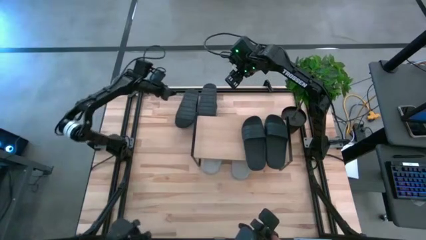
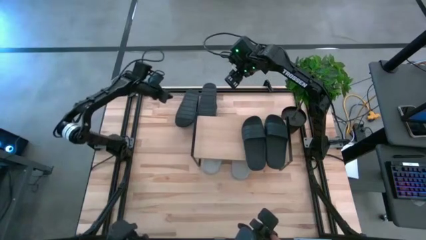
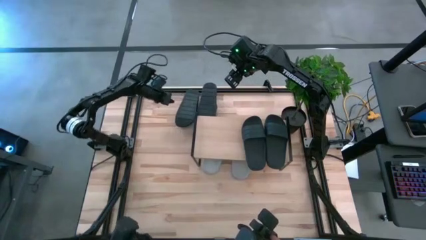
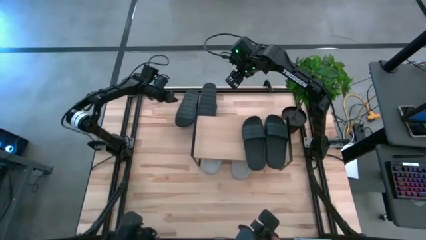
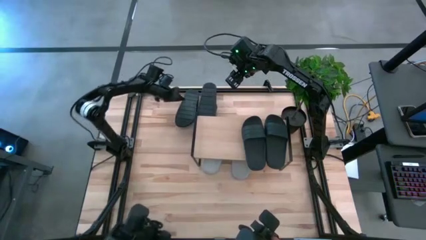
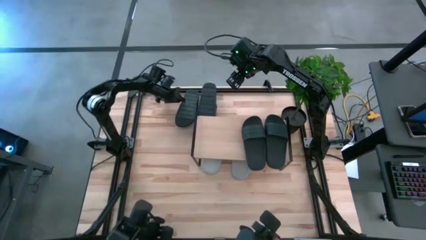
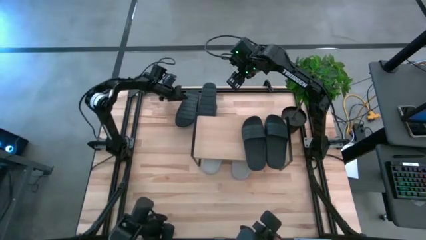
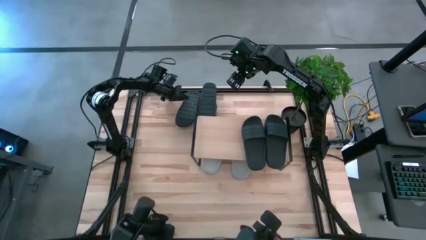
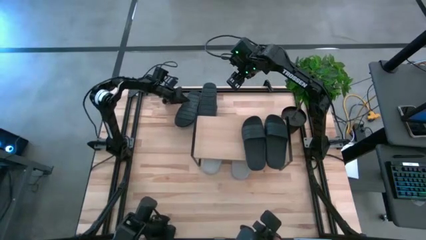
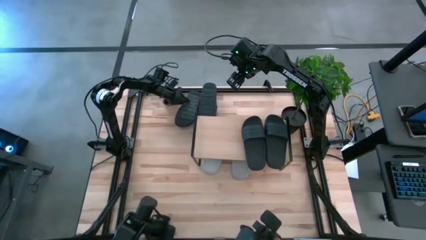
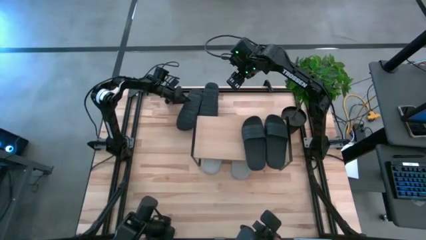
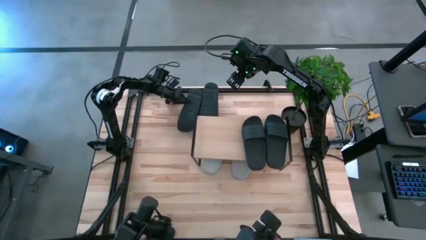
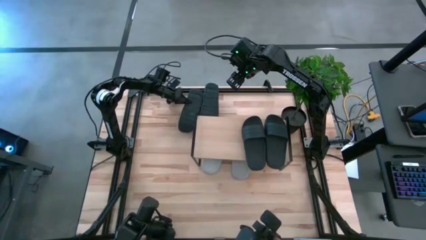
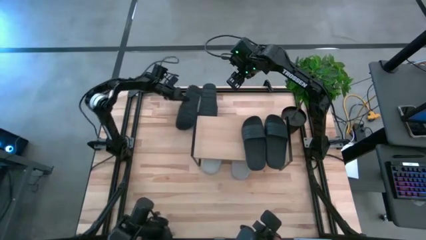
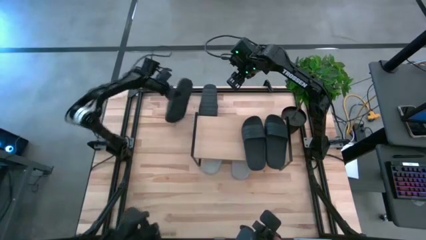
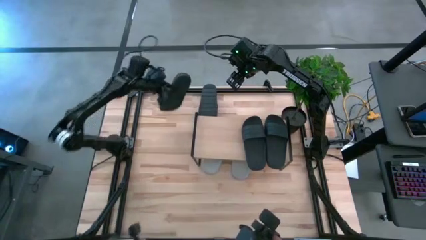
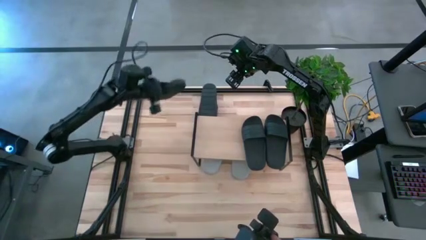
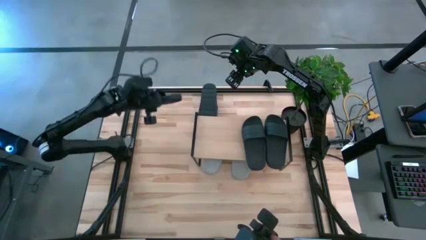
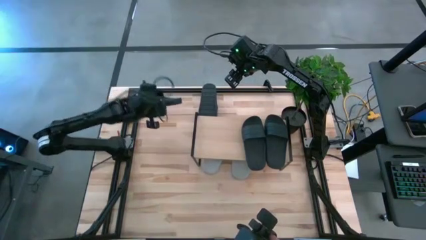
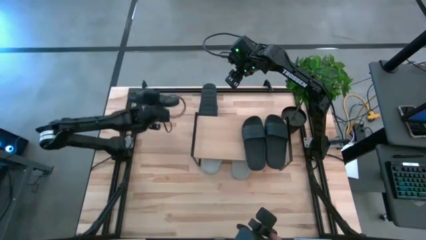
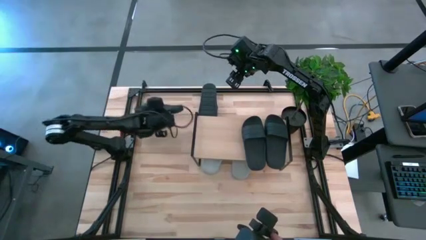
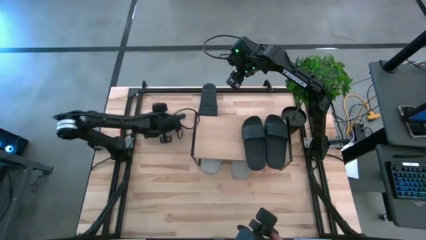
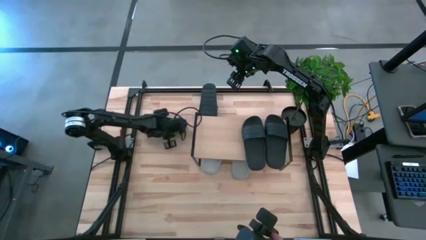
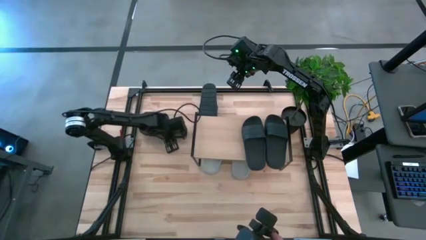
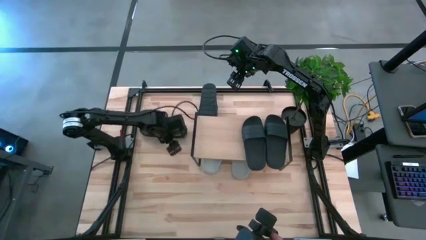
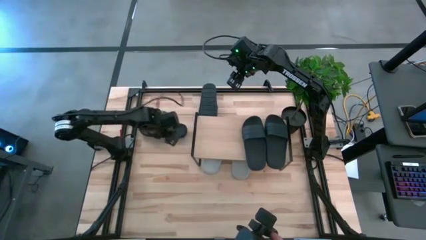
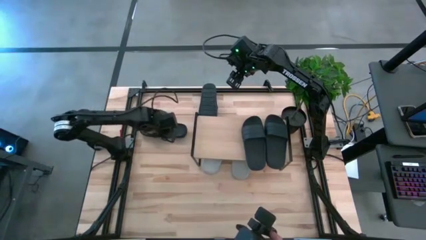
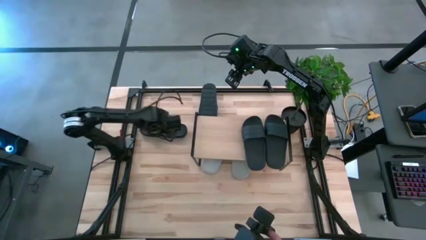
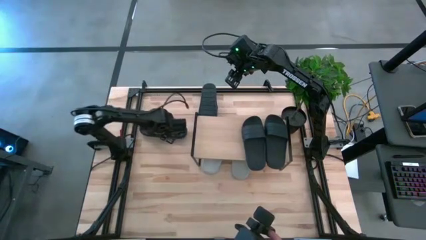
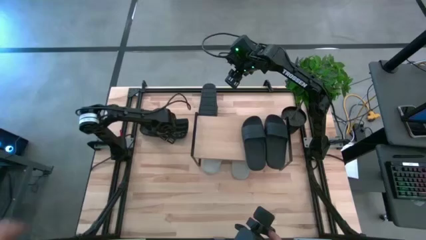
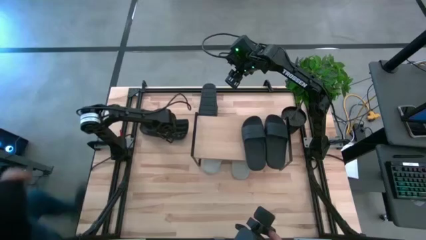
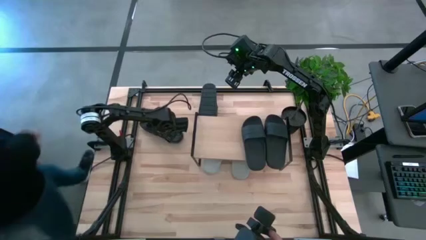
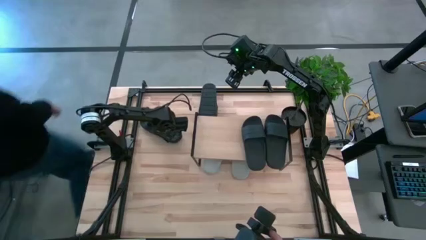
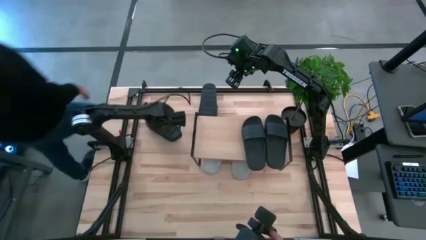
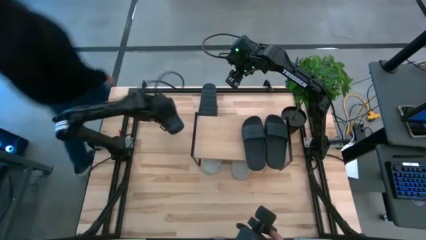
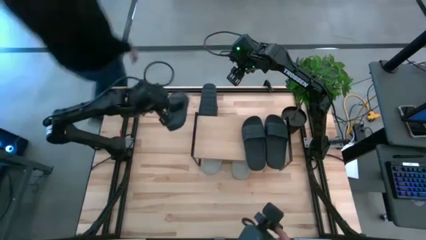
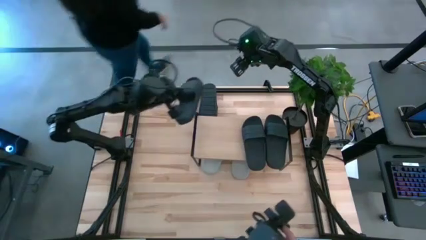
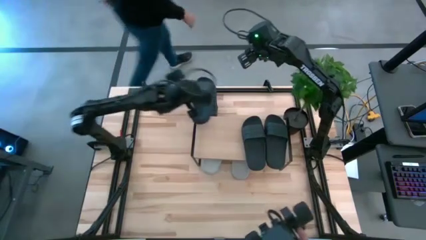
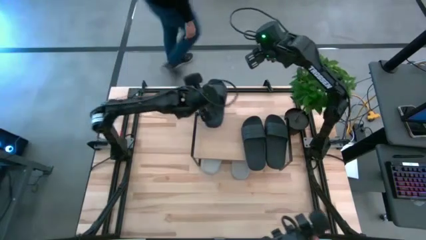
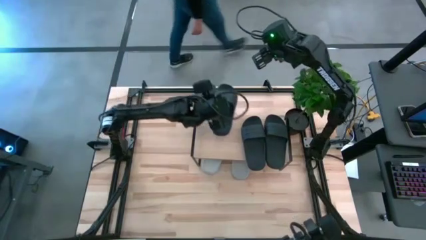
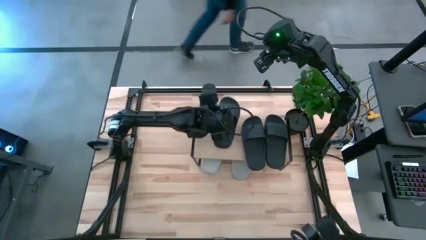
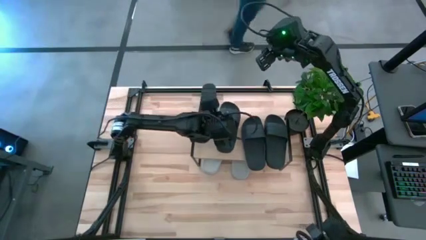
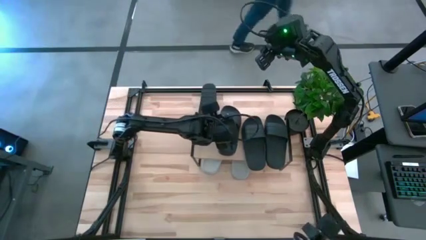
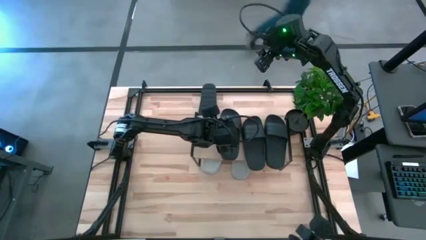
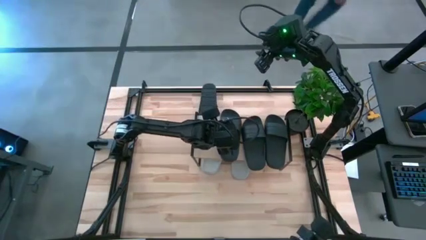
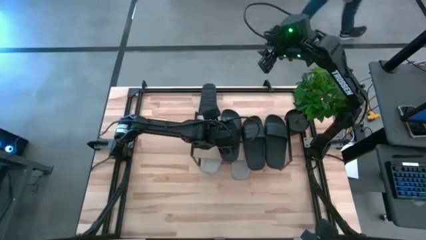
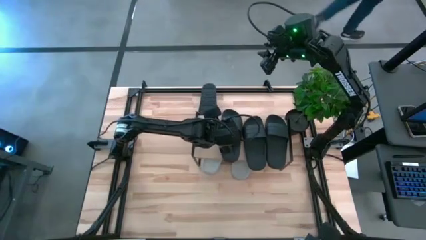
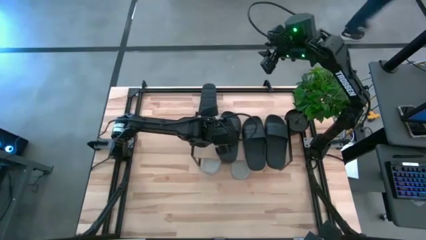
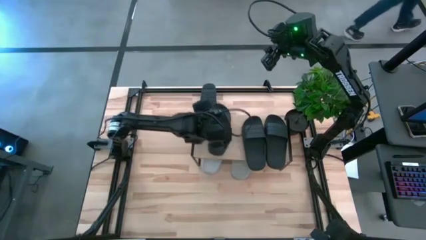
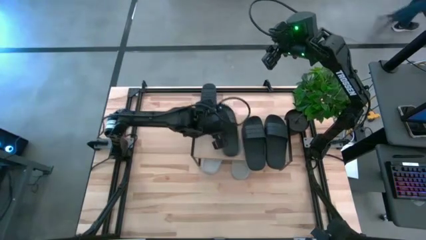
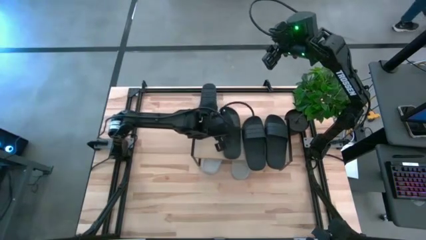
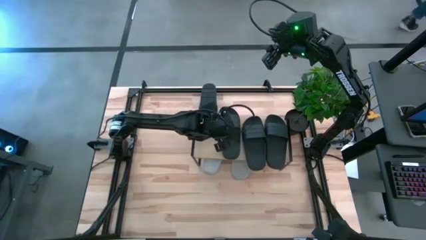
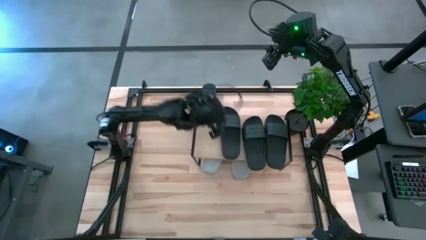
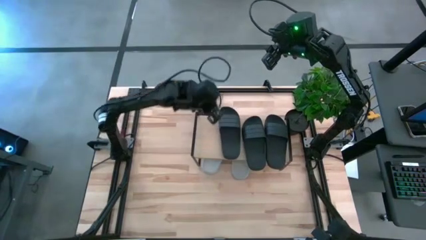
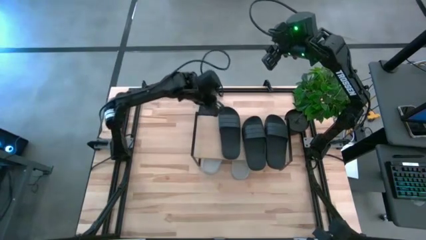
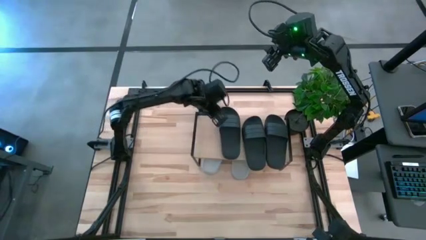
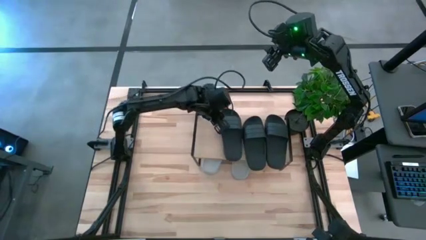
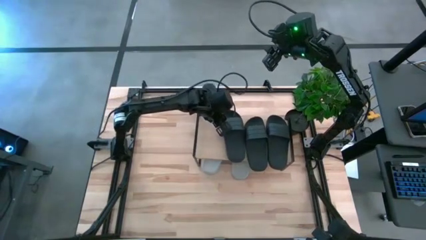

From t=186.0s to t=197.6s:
Task: Pick and place slides into the shelf
Put the black slipper on the shelf
